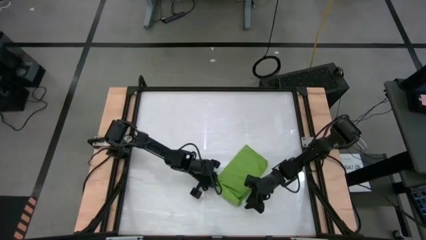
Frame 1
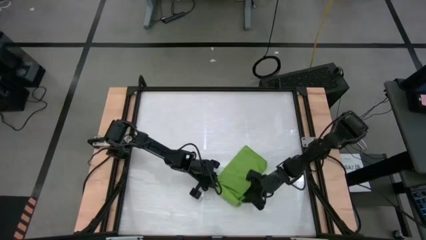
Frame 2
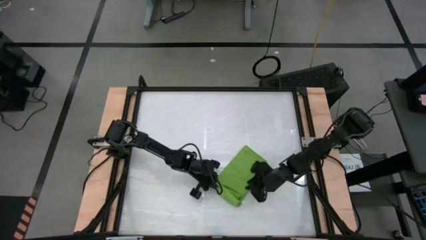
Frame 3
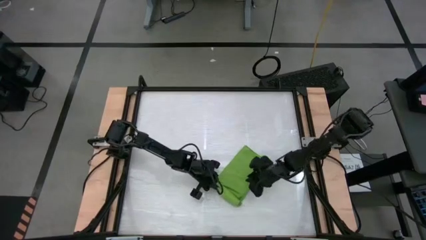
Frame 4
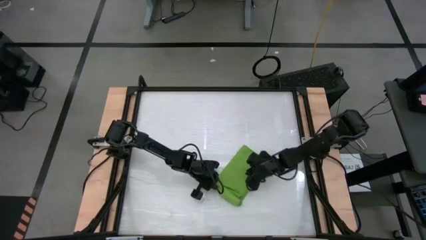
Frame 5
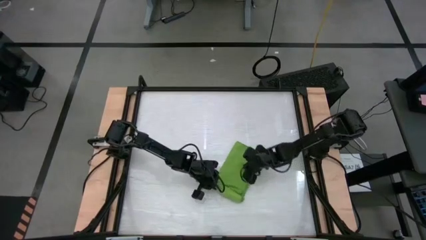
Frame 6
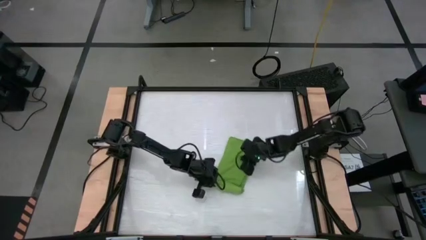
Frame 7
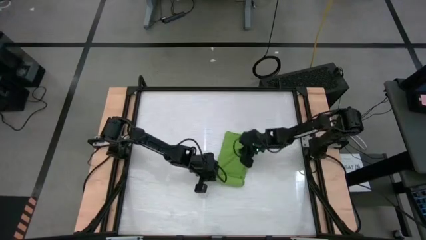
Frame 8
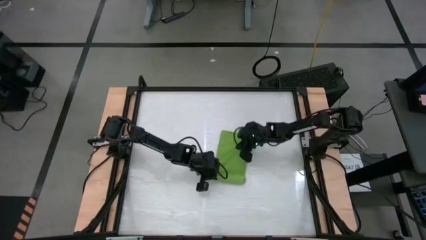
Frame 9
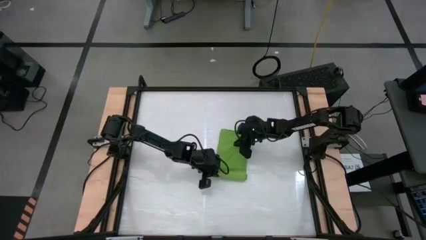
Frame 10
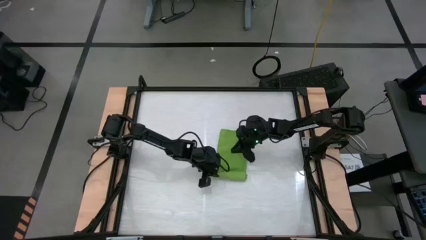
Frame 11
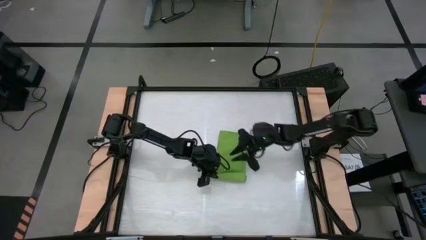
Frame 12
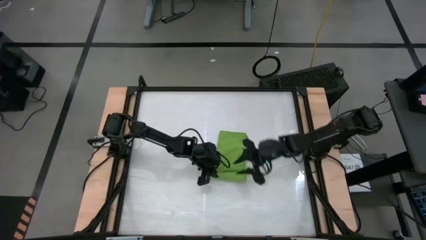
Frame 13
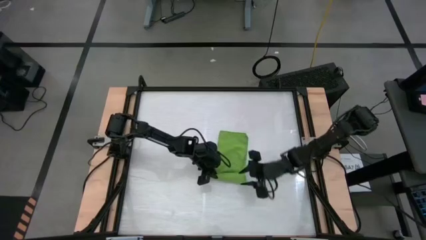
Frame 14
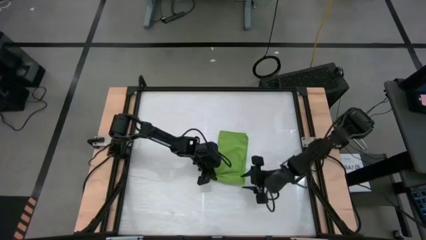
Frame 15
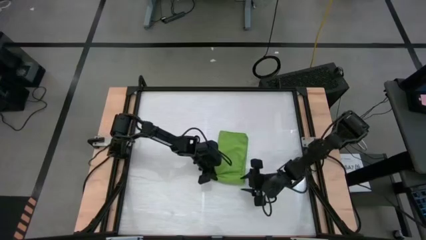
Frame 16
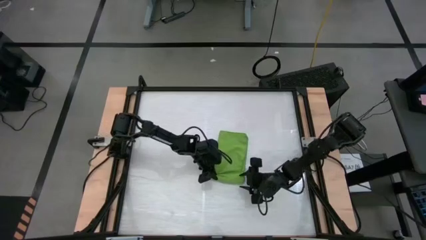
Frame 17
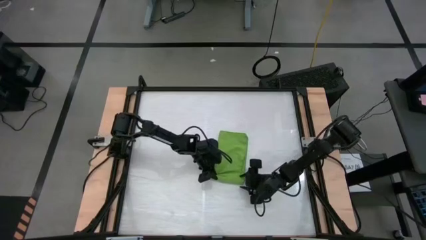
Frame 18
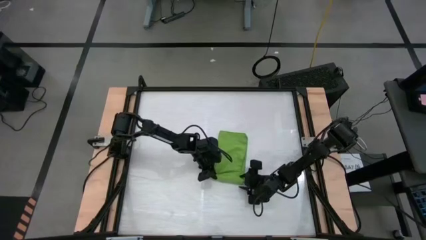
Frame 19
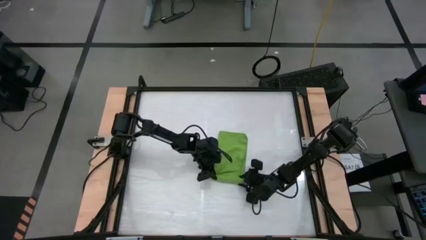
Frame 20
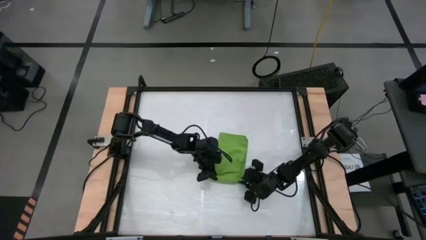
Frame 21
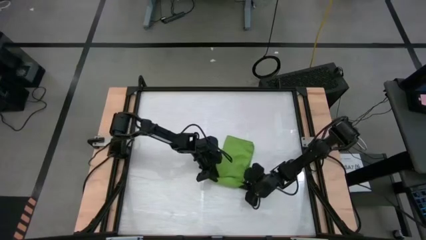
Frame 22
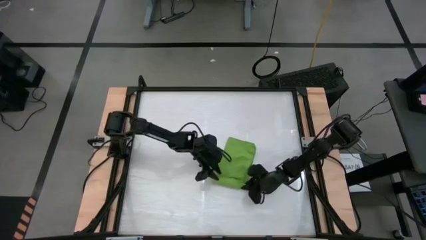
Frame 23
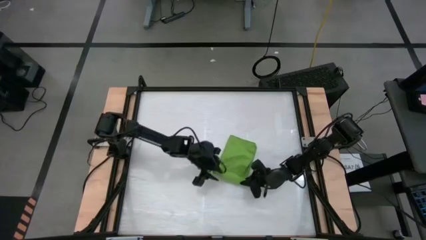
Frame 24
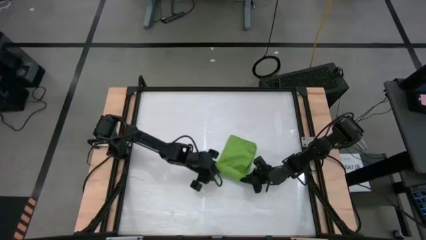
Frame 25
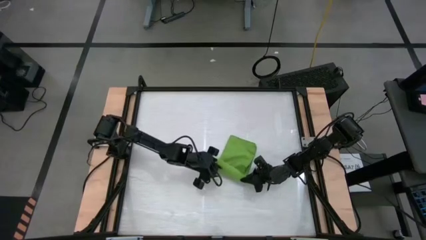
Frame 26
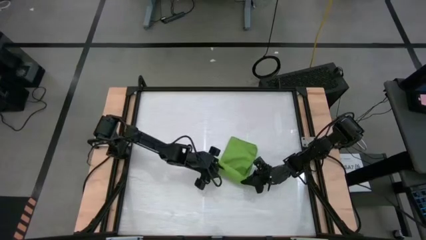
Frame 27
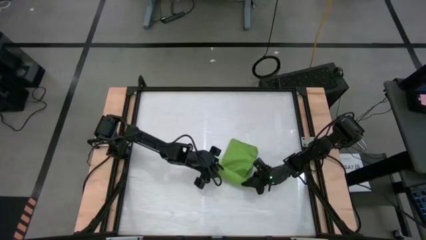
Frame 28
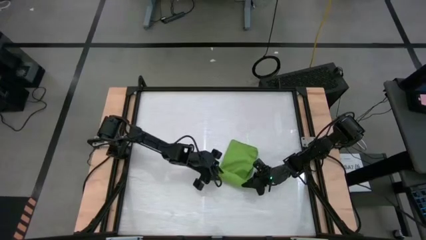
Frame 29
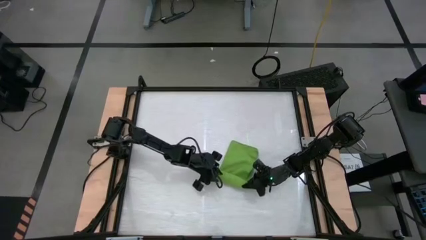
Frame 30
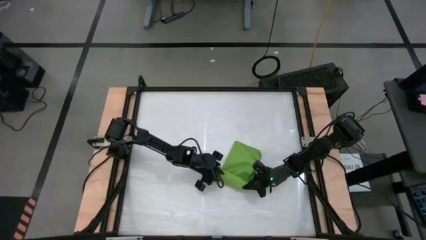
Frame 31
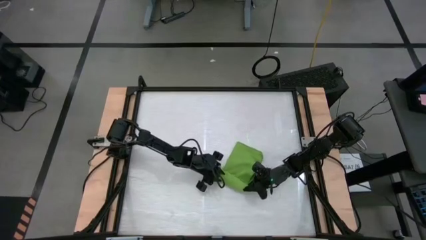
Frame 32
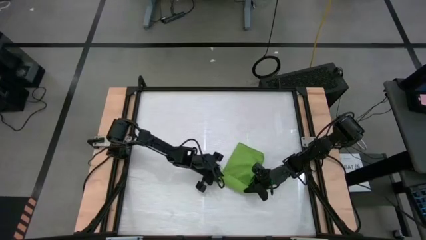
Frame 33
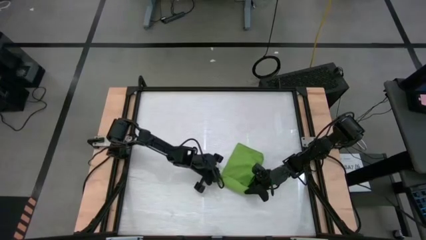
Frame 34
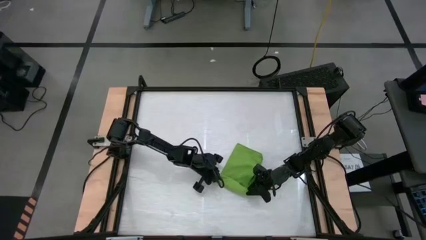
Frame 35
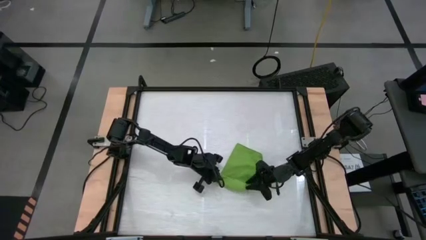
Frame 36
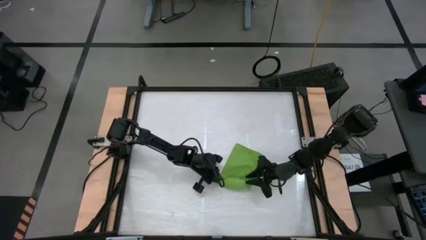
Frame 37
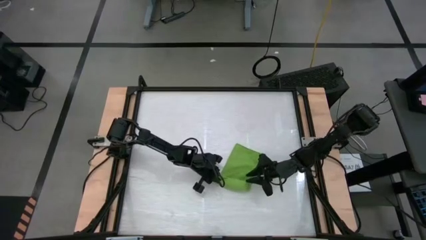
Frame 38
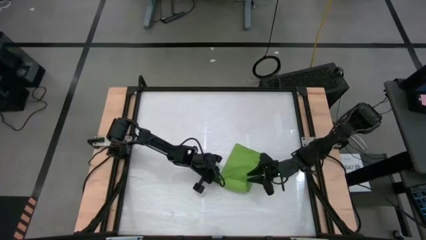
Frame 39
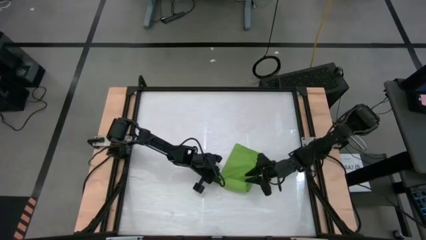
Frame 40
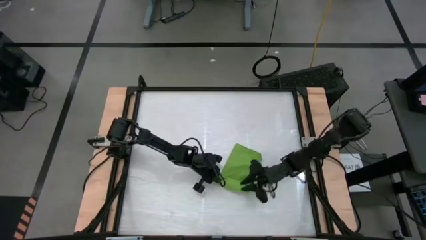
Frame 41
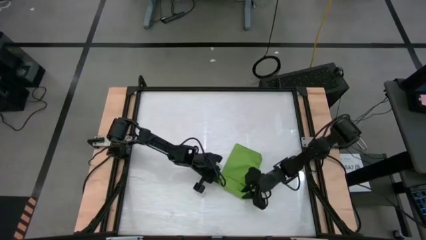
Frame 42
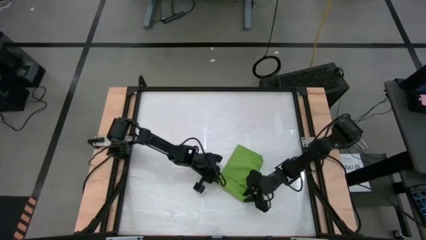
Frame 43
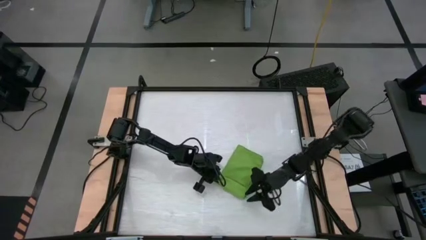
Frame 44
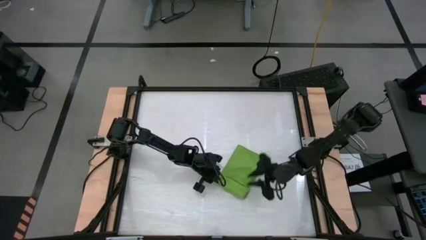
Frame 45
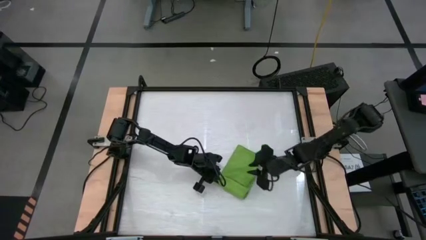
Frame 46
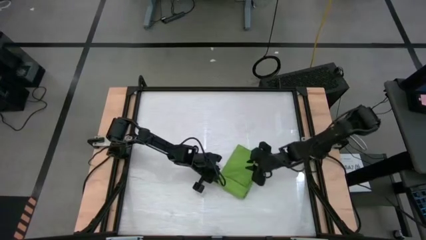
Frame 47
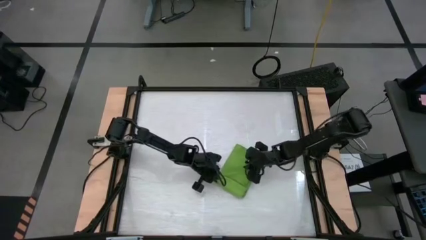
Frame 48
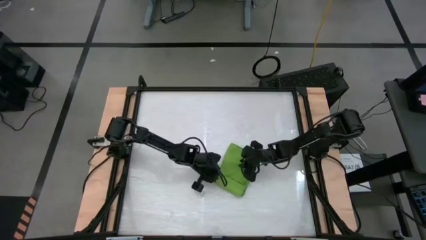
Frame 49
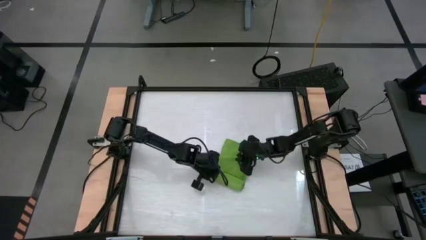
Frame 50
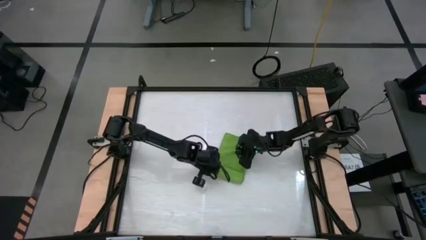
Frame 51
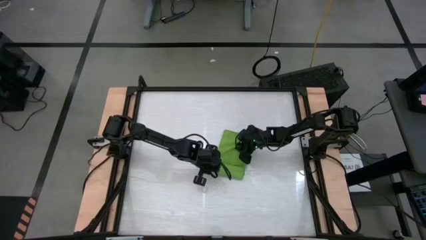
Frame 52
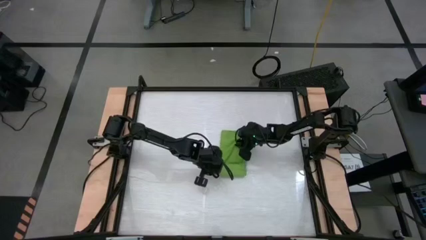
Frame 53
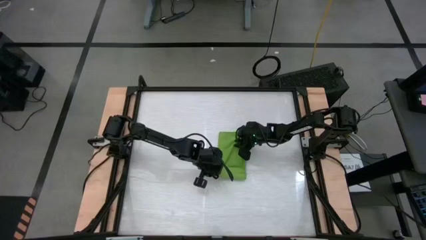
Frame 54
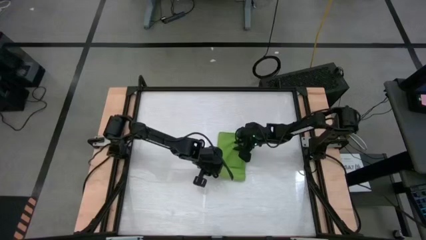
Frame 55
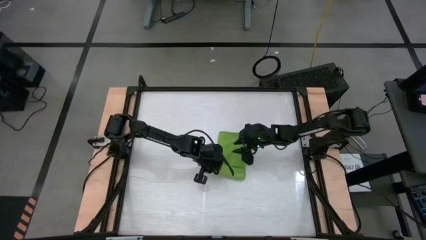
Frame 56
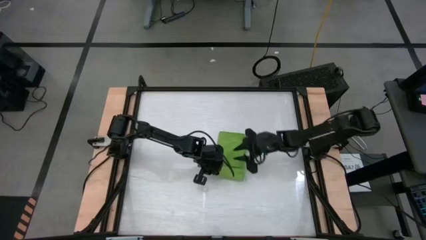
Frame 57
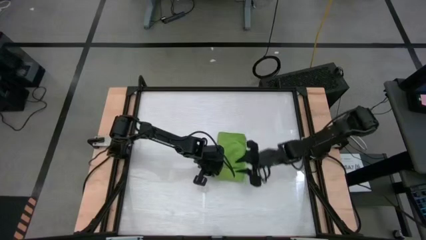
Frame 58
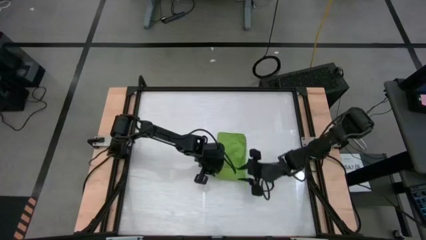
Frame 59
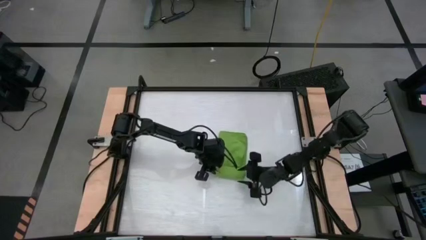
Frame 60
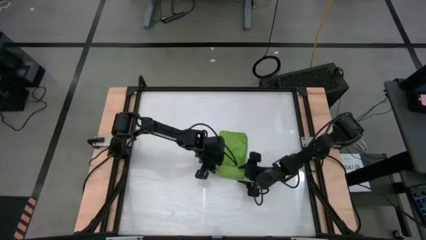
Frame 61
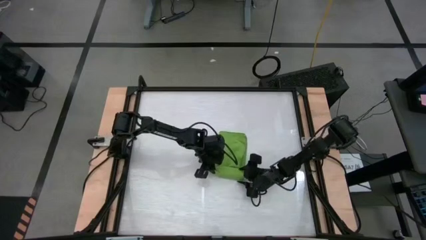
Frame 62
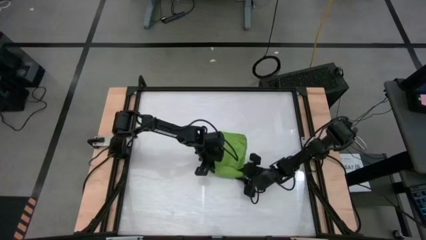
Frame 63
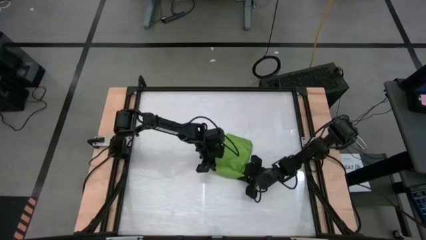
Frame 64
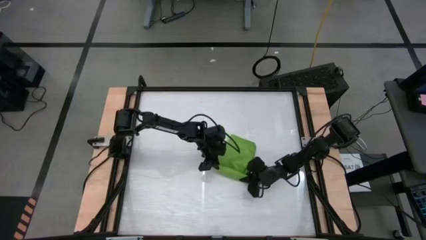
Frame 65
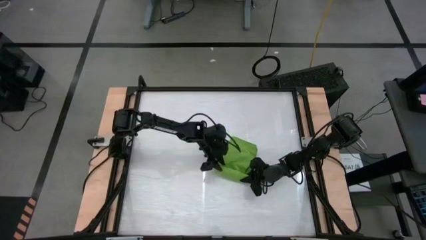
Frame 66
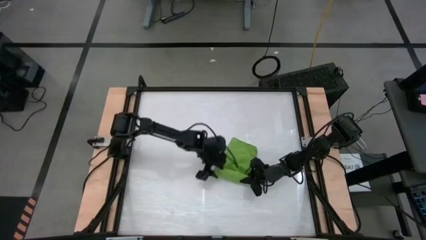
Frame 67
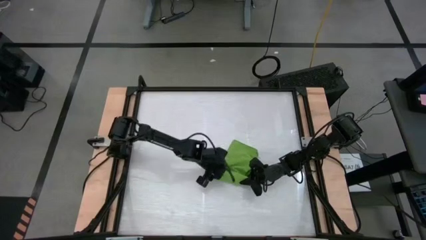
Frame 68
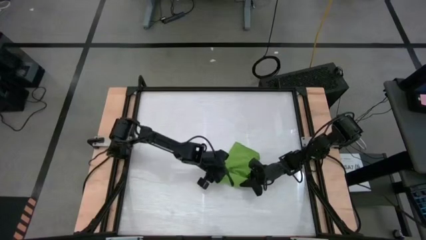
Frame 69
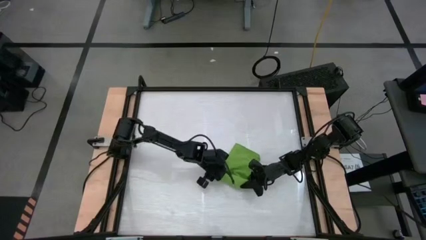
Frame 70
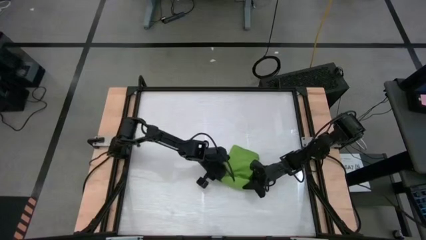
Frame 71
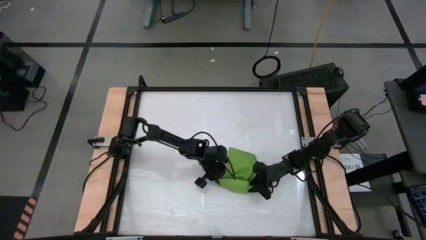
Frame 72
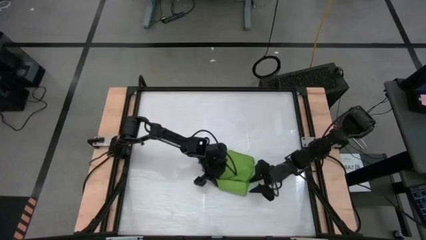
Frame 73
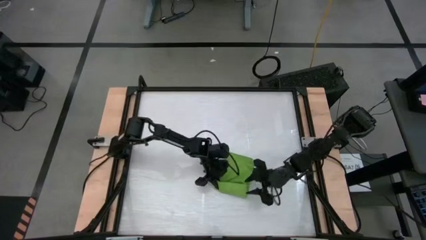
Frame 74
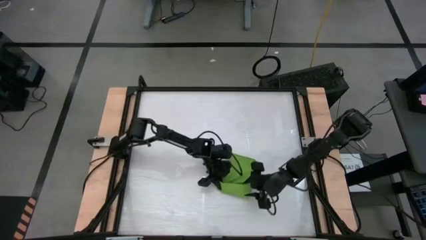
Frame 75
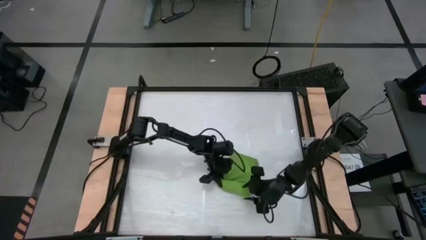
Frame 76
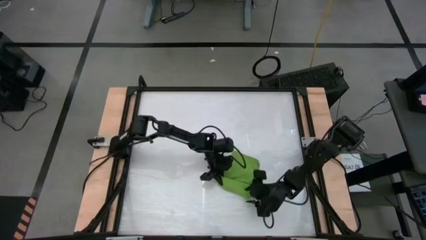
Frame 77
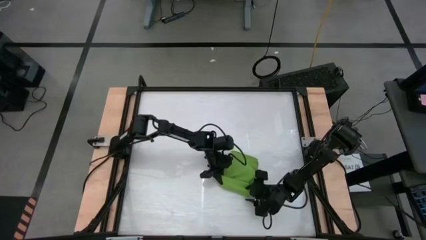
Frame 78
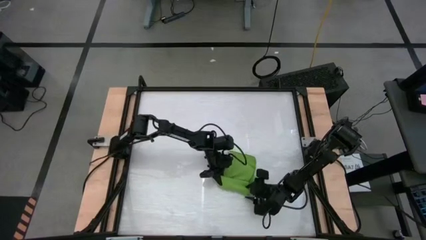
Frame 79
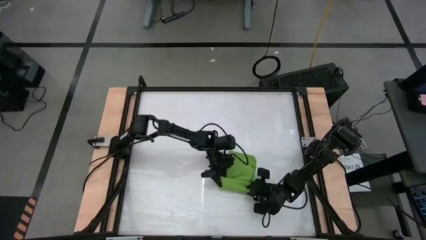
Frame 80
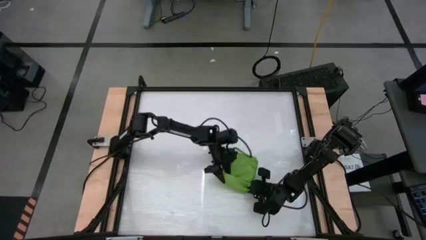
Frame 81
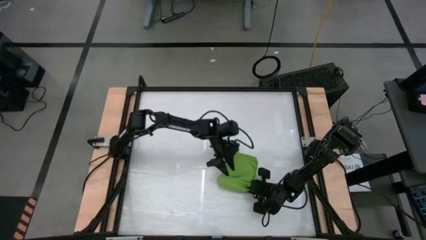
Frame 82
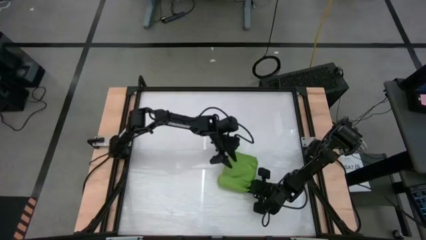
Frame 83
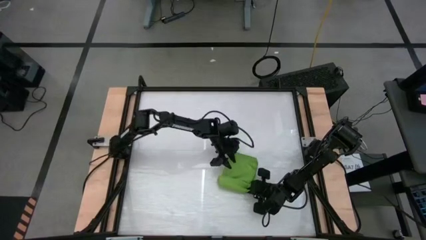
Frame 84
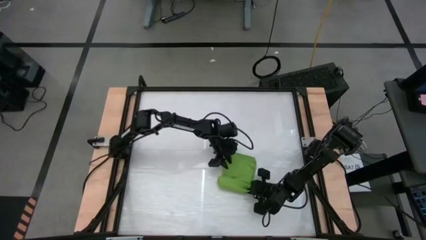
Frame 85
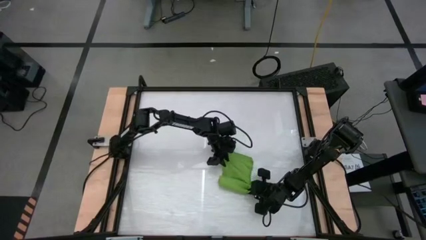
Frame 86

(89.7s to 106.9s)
Task: Roll towel
Roll the green microfiber cloth
